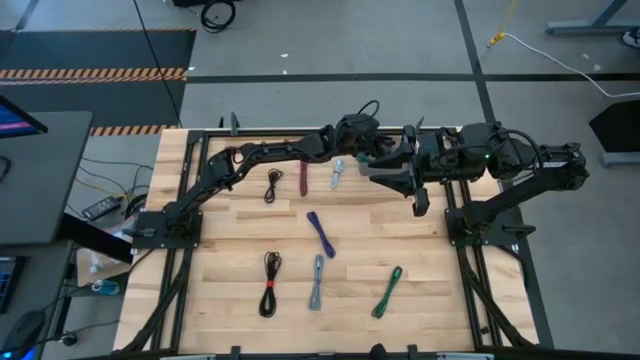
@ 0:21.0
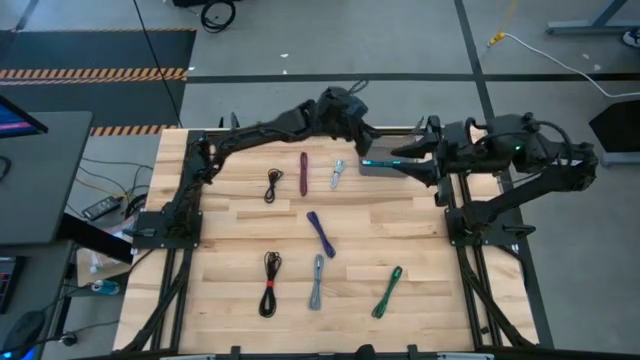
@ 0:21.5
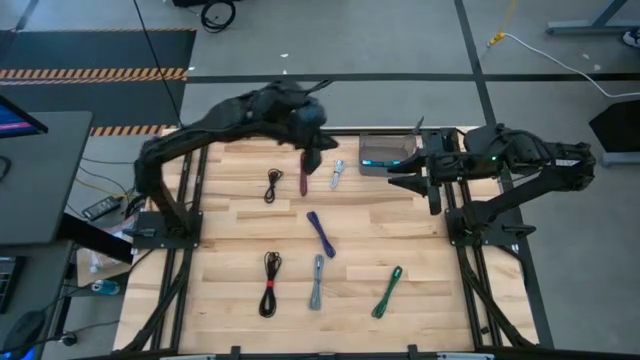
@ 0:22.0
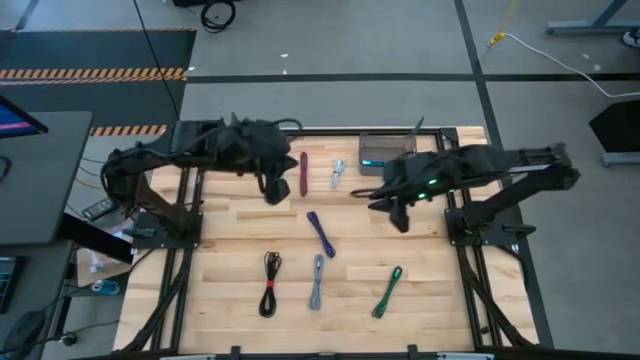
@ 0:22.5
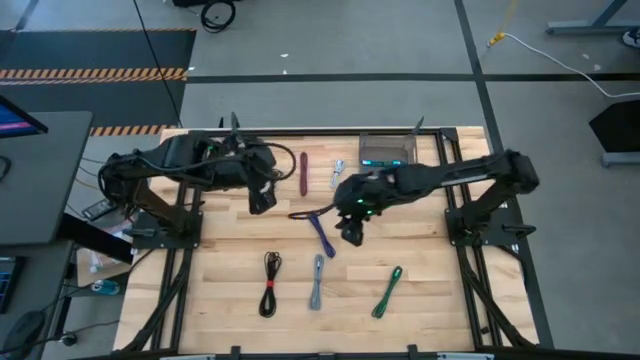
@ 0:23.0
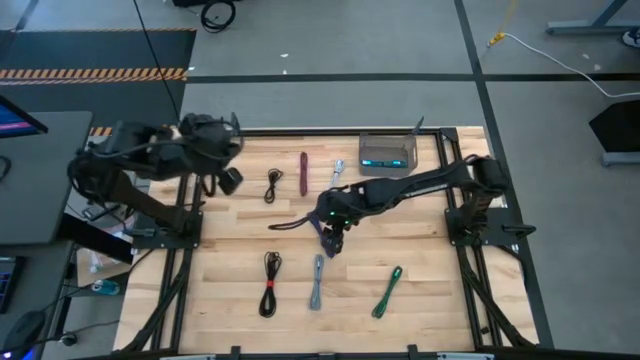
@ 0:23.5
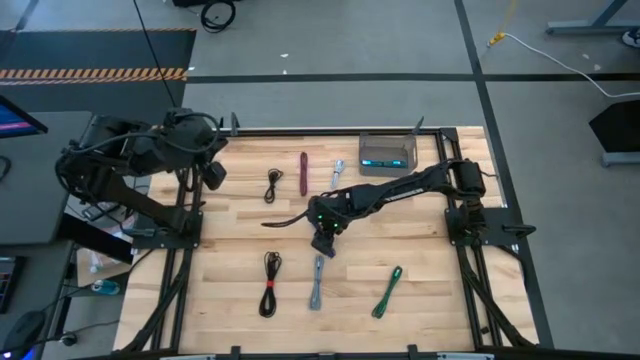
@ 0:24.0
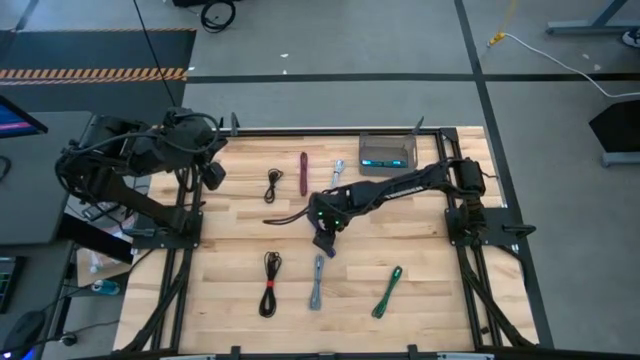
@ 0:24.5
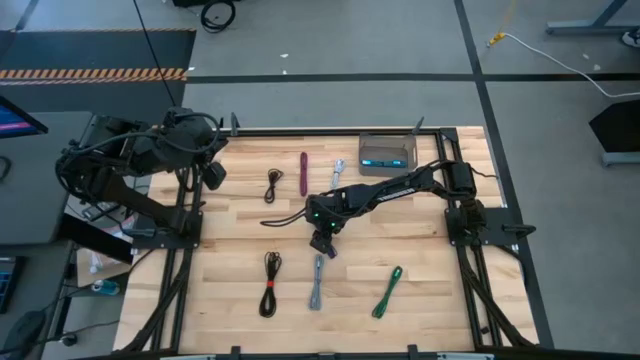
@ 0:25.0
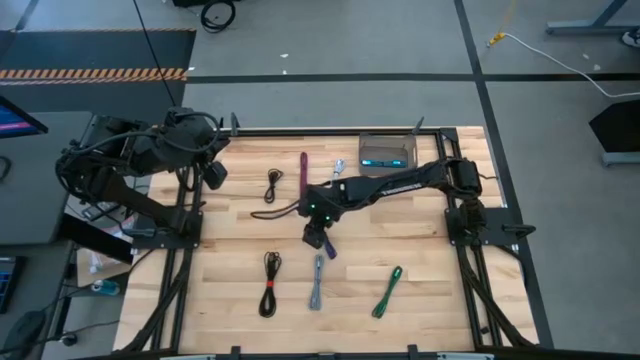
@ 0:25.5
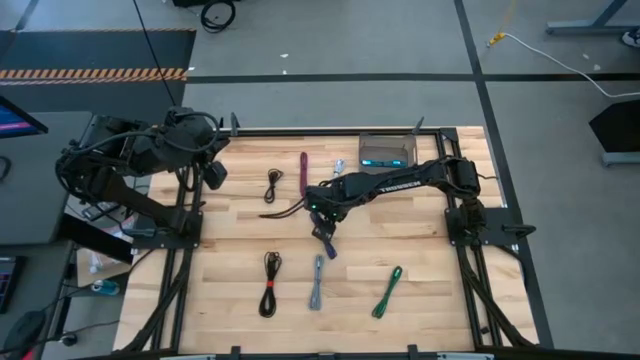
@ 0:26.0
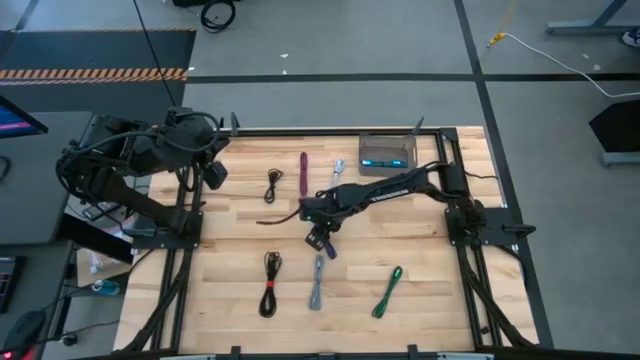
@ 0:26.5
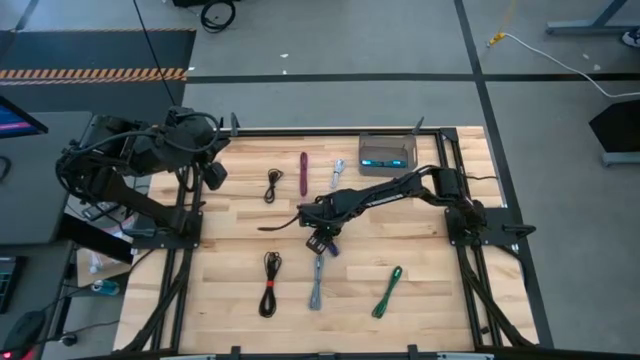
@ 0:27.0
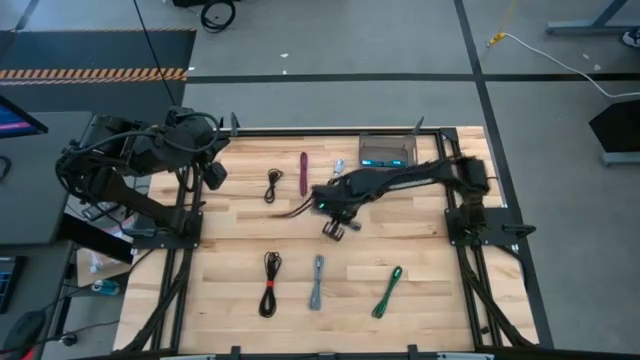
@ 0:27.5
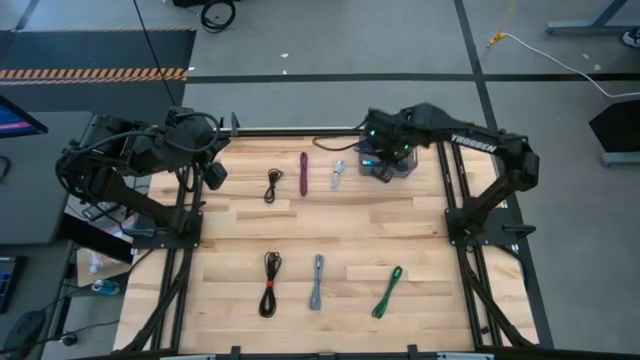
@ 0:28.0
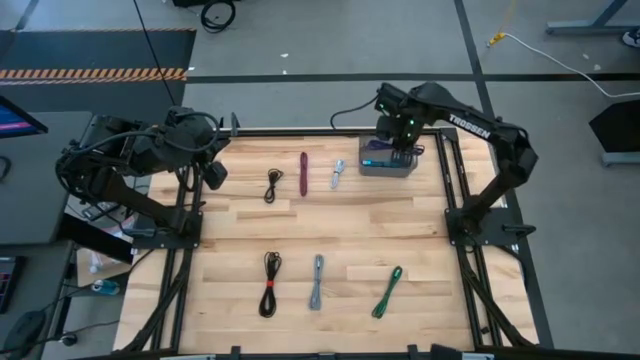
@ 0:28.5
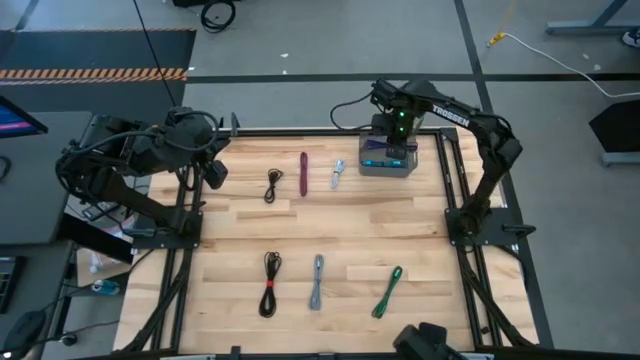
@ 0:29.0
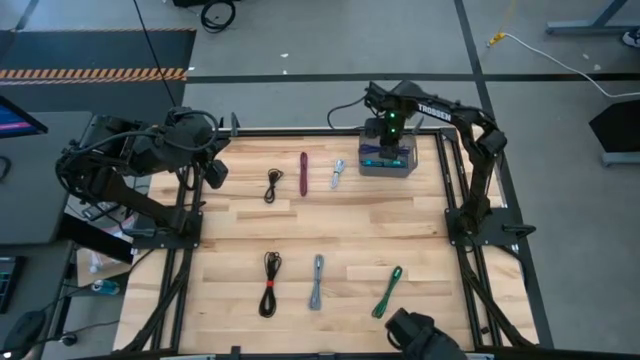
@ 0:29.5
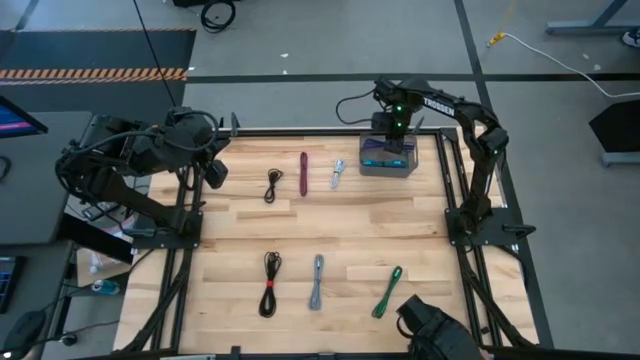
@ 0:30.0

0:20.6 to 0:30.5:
Task: Pick and place USB-C Cables
Put the black violet charger cable into the black bin

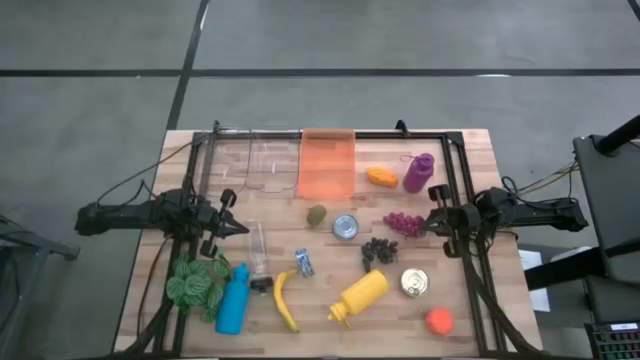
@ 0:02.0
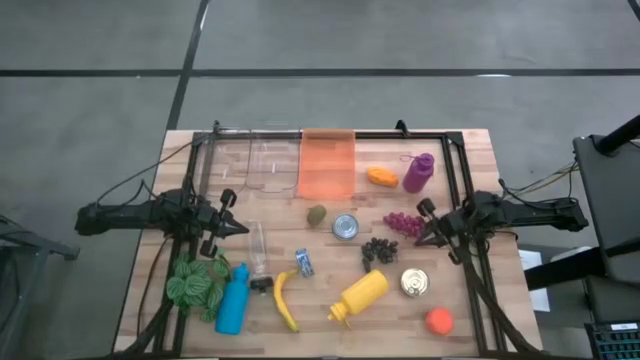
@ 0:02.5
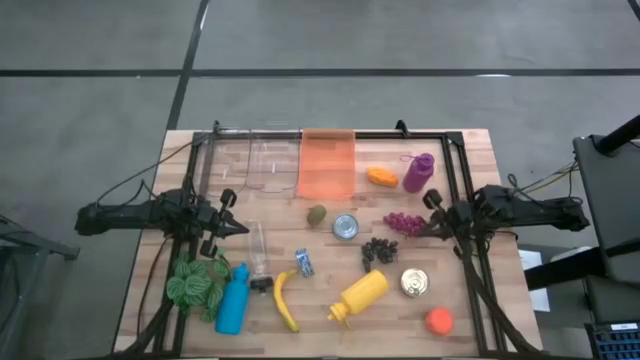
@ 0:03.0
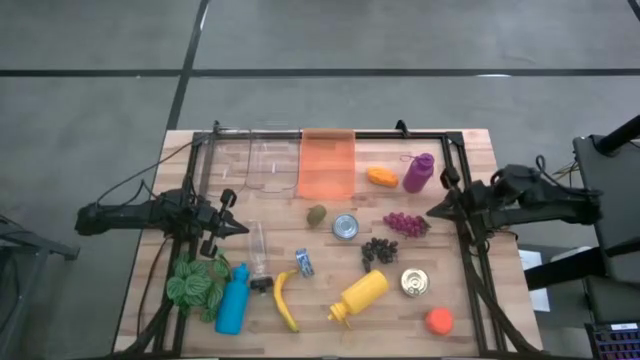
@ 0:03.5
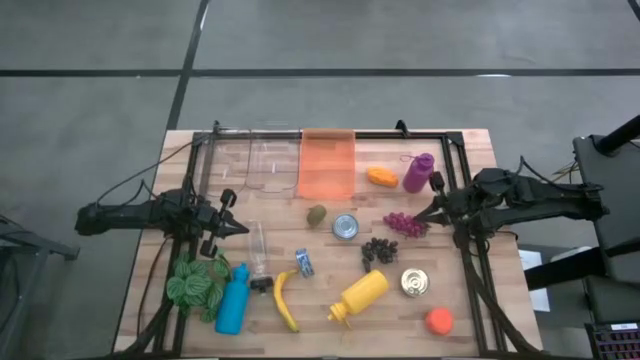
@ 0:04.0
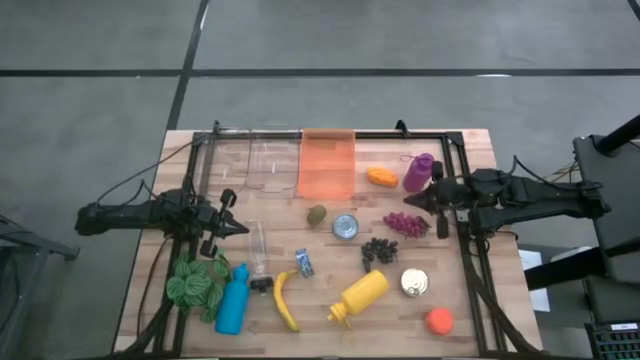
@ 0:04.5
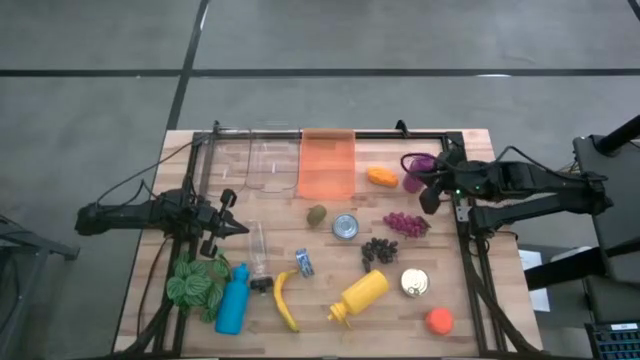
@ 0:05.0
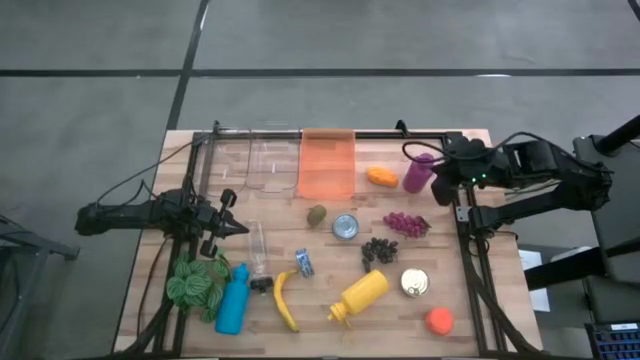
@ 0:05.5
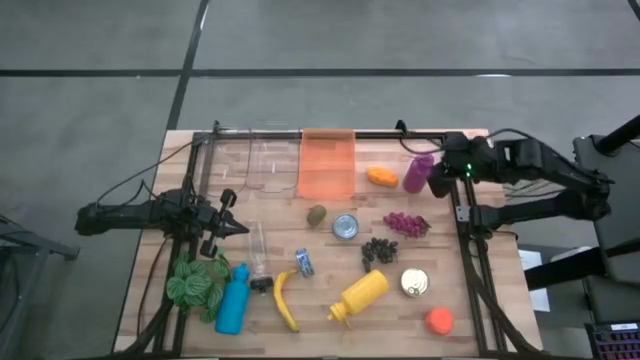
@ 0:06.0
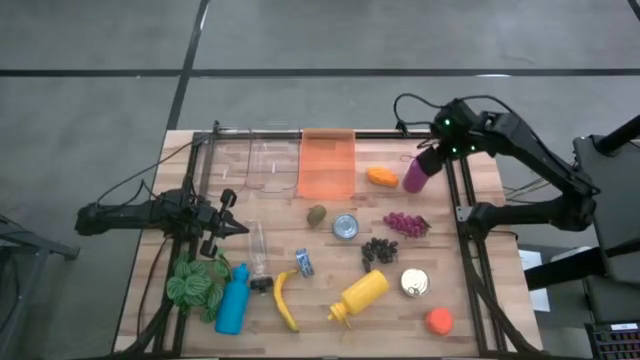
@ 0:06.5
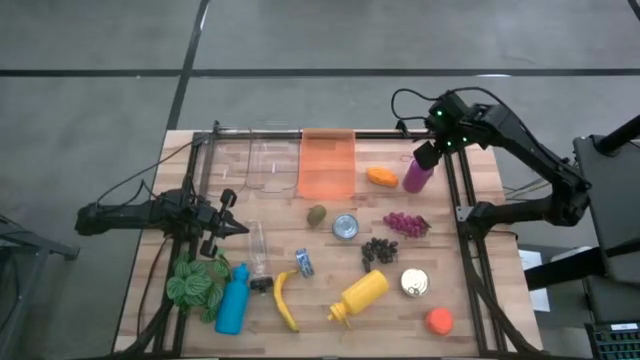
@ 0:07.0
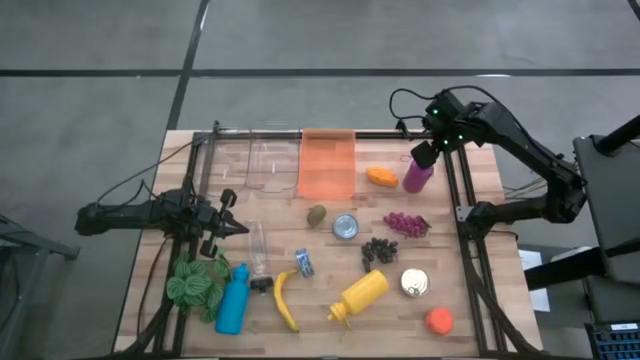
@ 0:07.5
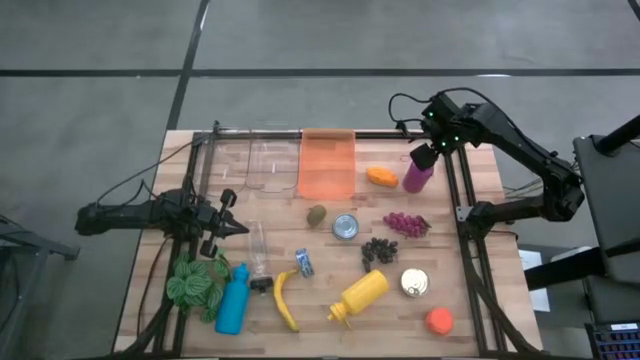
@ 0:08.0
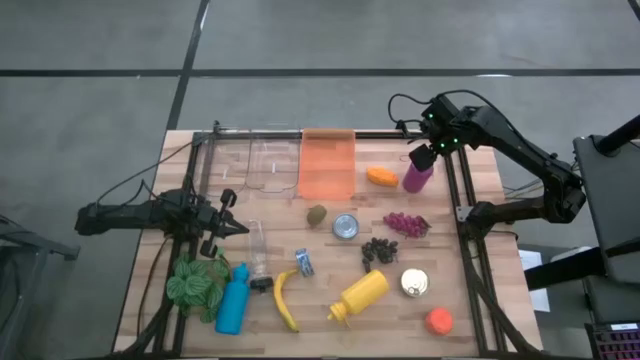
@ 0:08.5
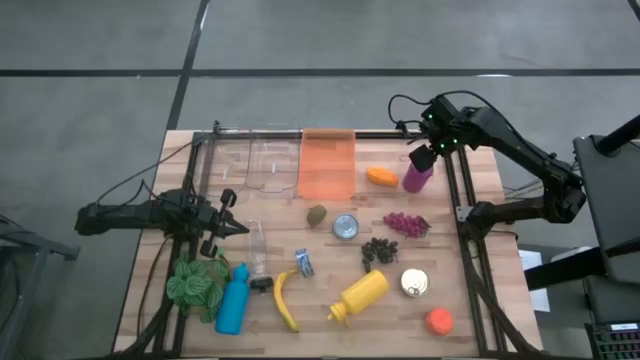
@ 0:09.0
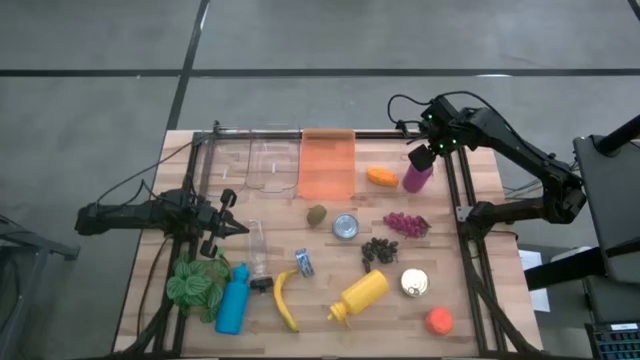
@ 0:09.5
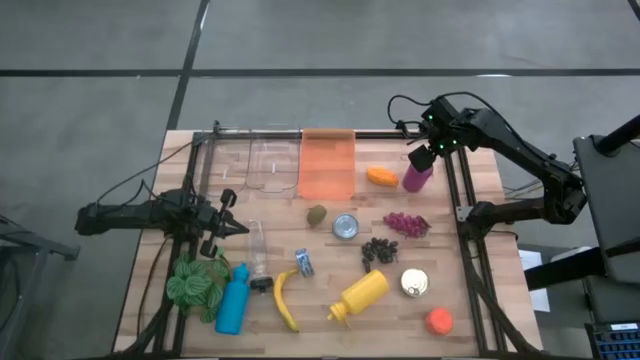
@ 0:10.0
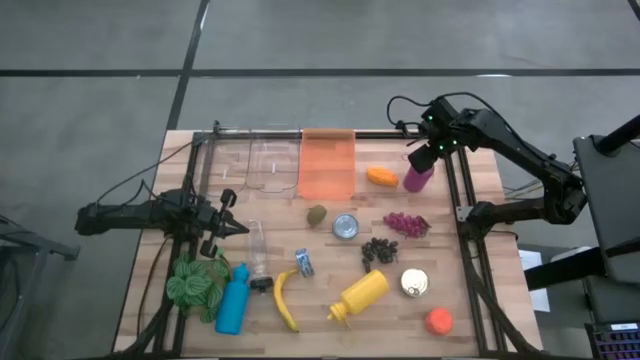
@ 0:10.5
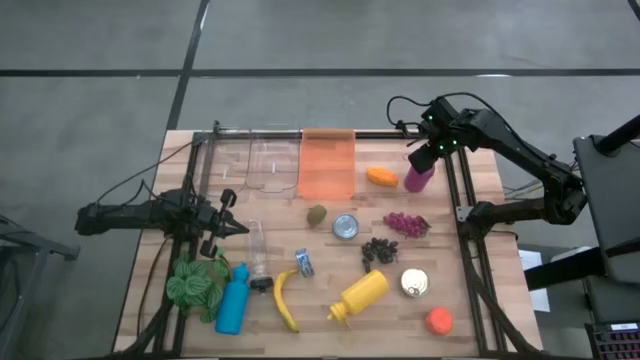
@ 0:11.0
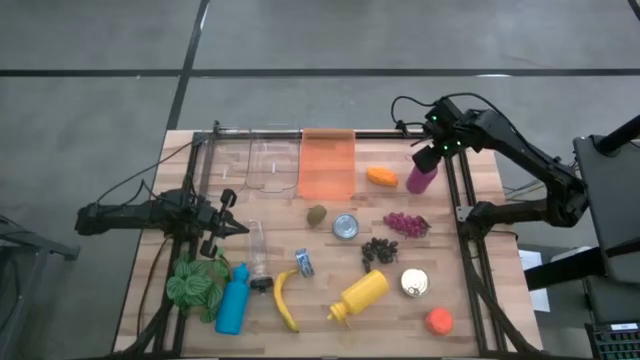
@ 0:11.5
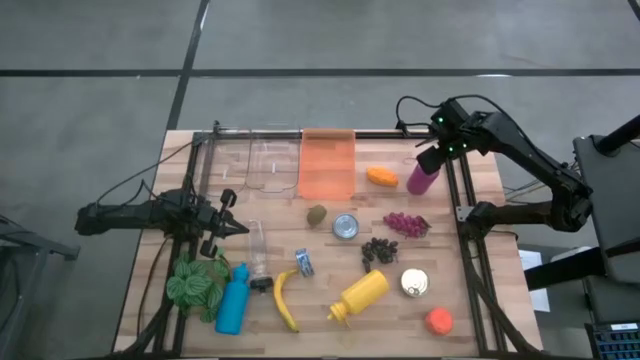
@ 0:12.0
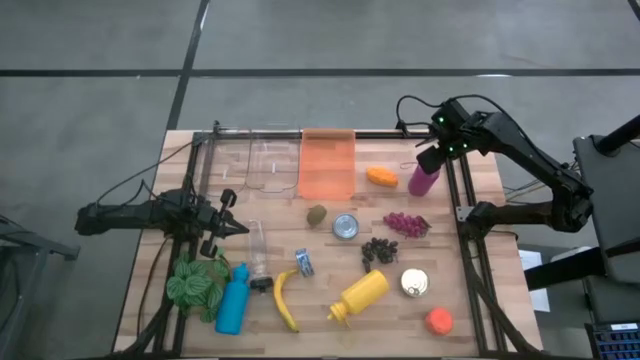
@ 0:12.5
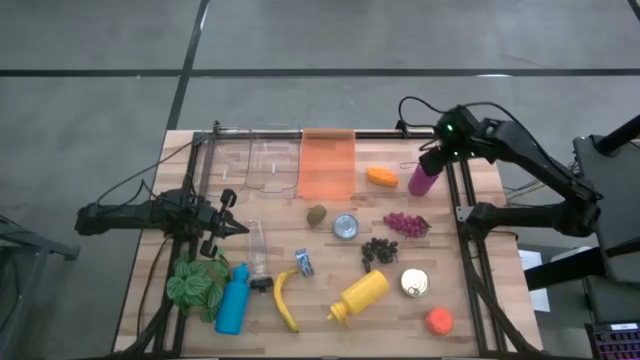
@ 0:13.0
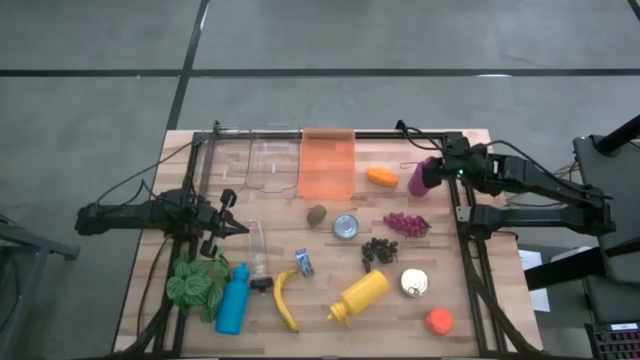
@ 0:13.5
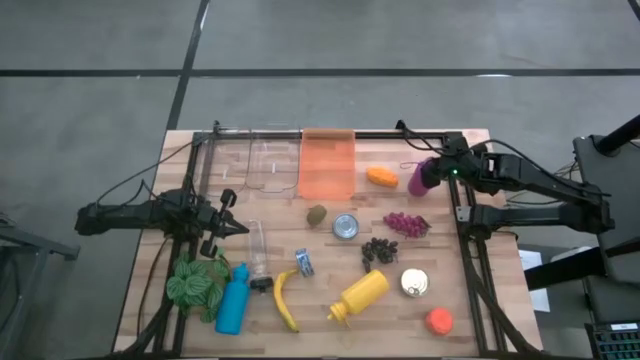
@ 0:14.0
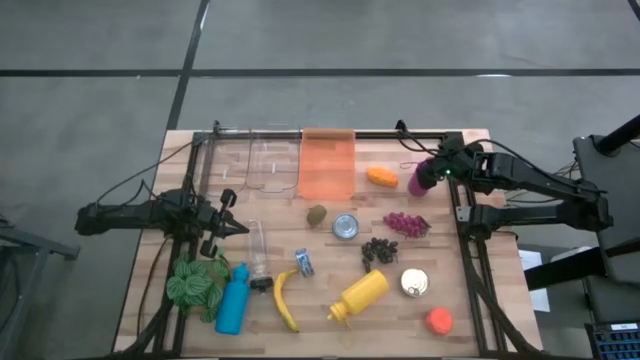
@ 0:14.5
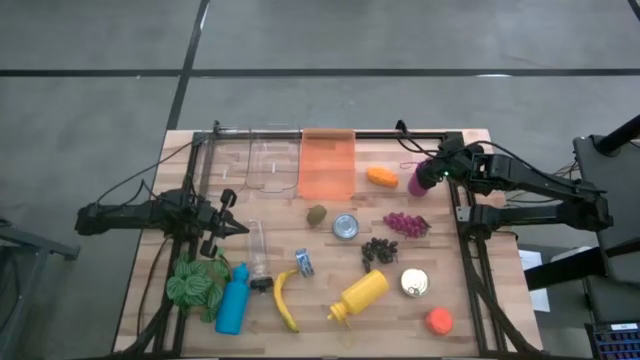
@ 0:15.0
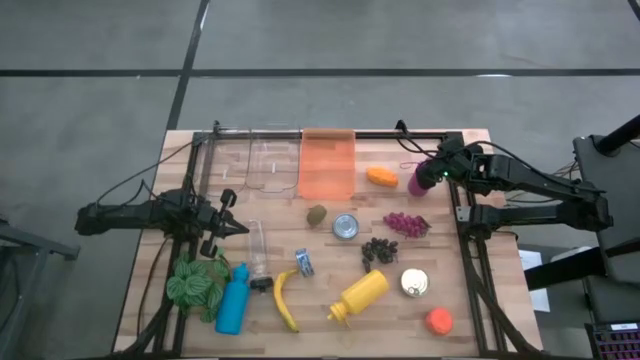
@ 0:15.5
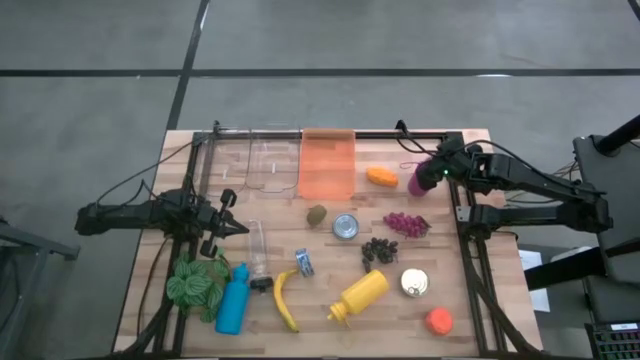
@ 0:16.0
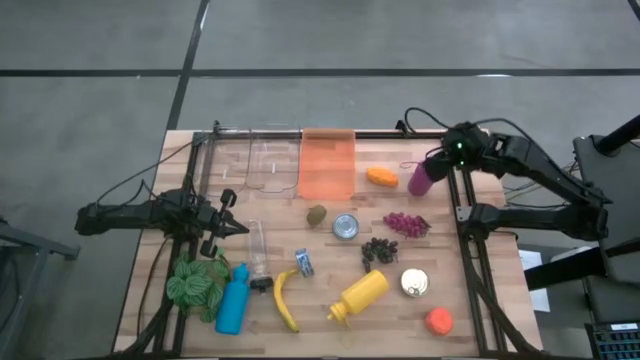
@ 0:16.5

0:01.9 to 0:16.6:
Task: Pick & Place Food Item
Put the purple tumbler into the orange bin
